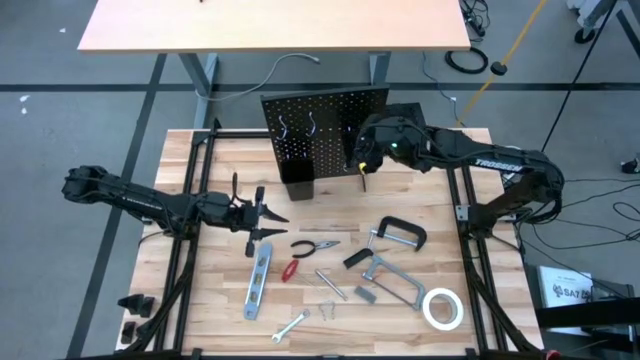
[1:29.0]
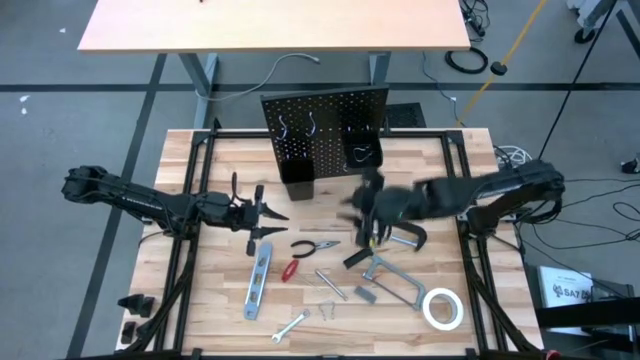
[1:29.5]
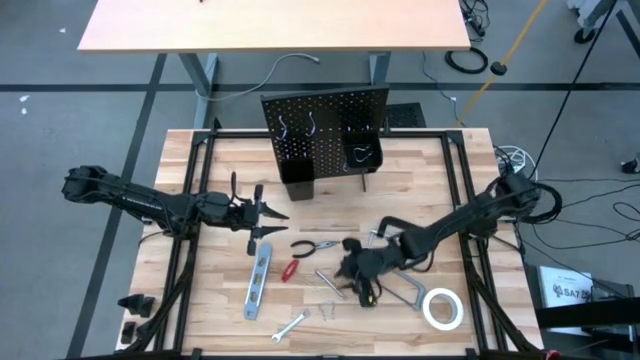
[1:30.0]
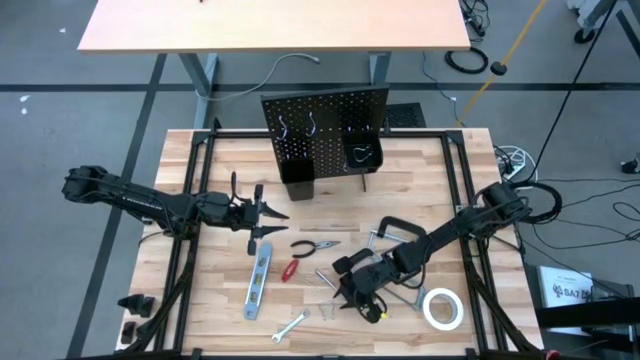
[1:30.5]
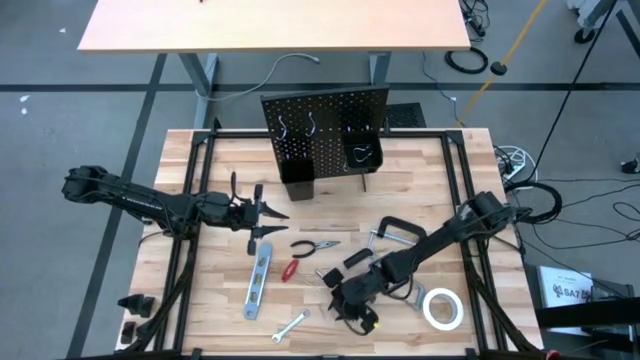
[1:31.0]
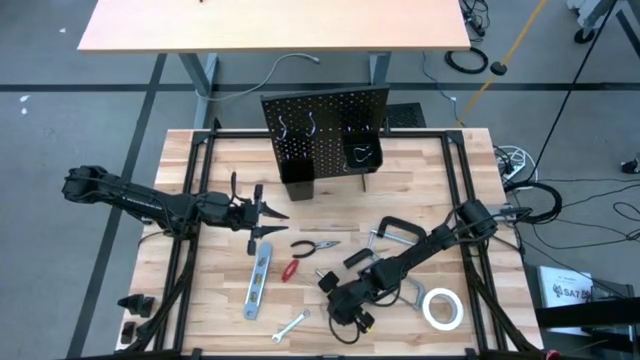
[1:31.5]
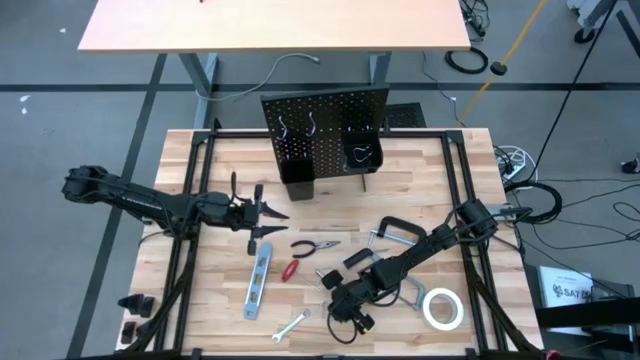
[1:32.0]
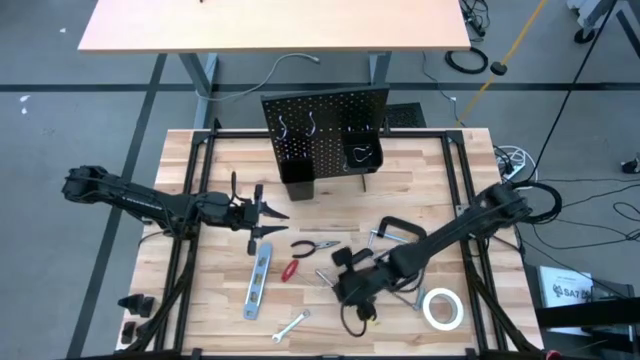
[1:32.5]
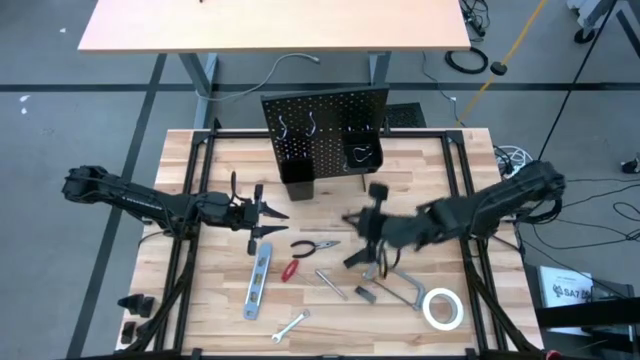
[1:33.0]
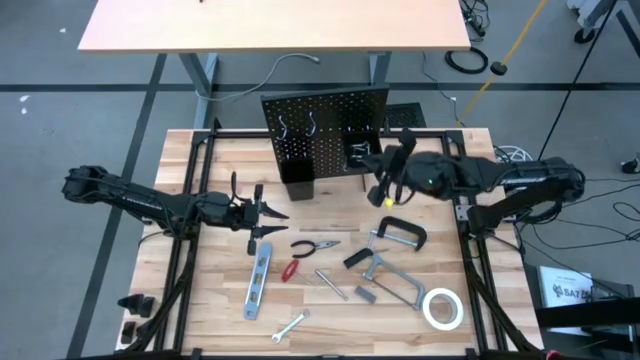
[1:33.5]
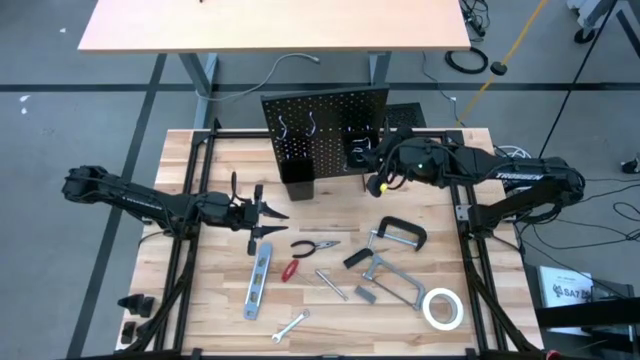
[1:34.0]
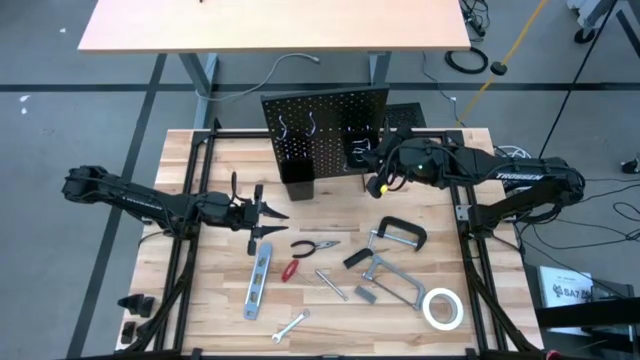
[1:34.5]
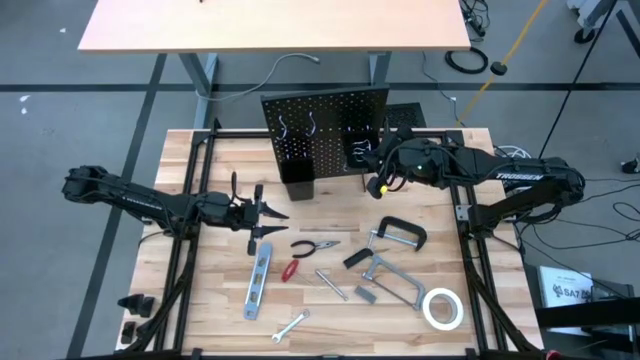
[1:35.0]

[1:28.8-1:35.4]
Task: Hang tools onto peg board
Put the binder clip into the right black bin on the pegboard

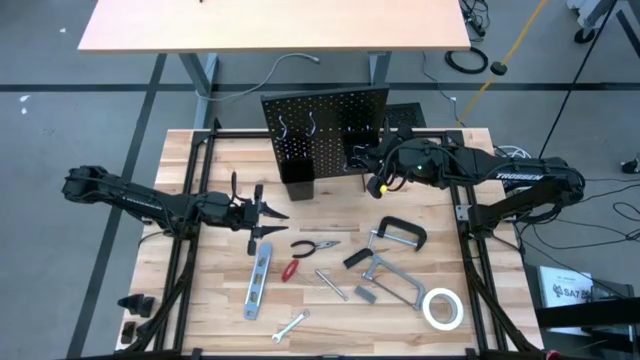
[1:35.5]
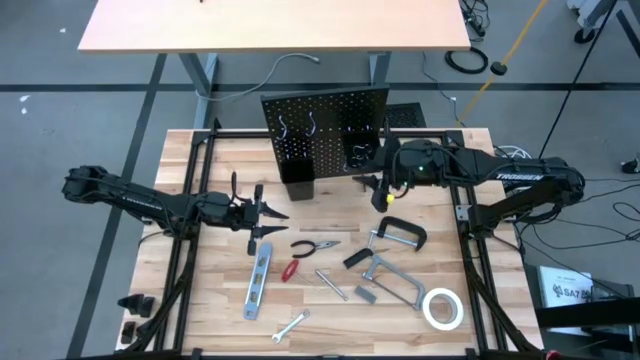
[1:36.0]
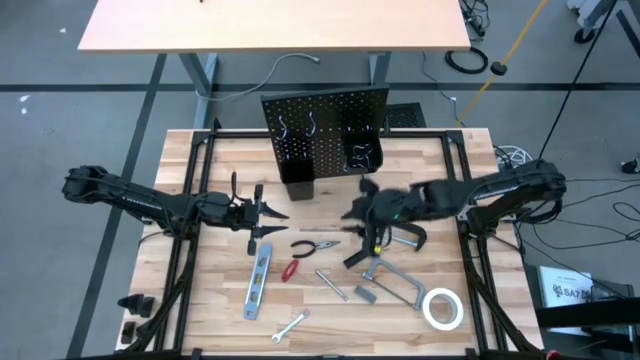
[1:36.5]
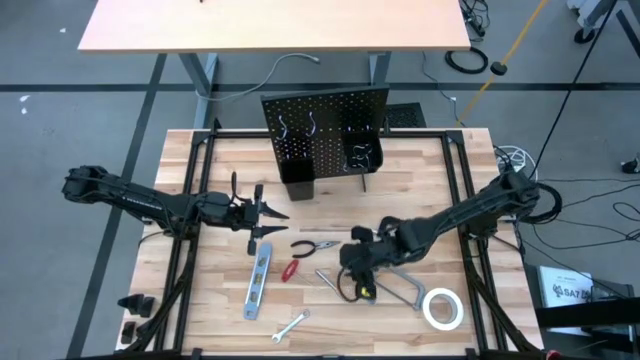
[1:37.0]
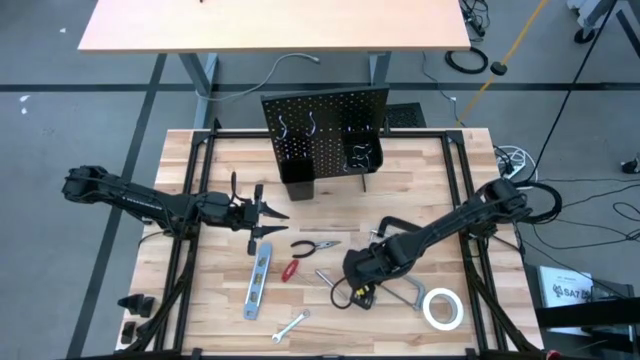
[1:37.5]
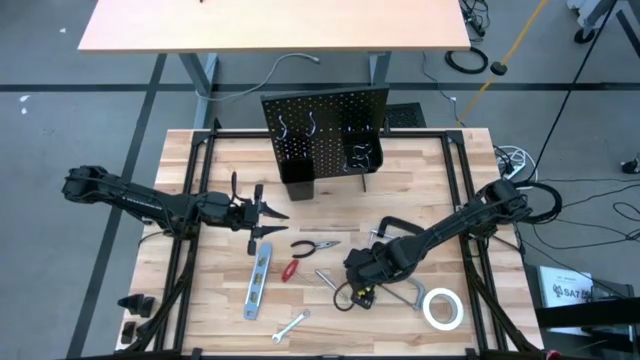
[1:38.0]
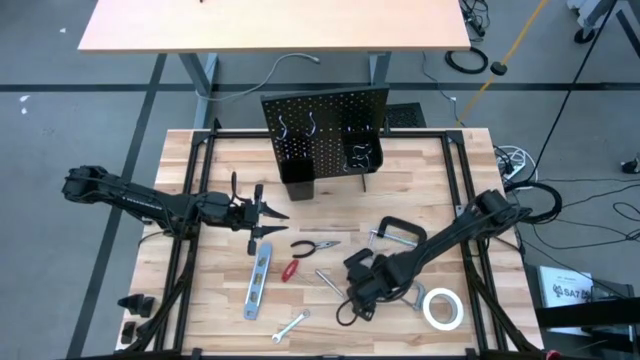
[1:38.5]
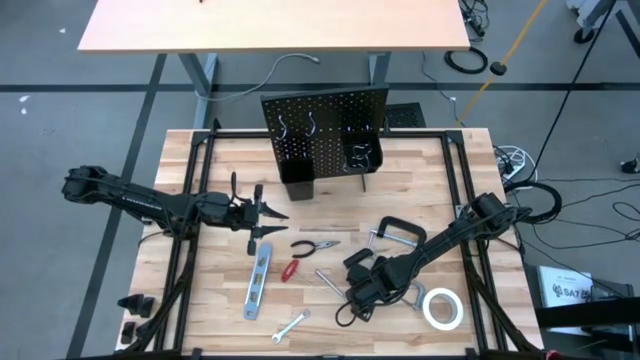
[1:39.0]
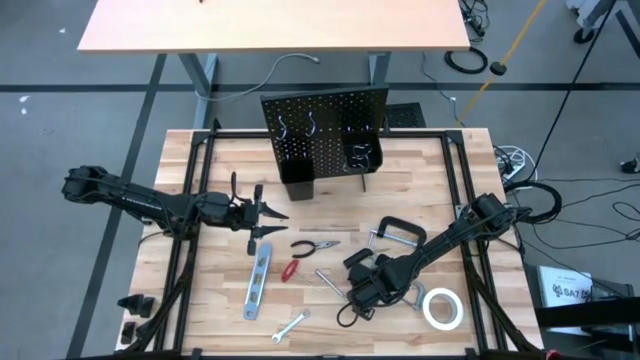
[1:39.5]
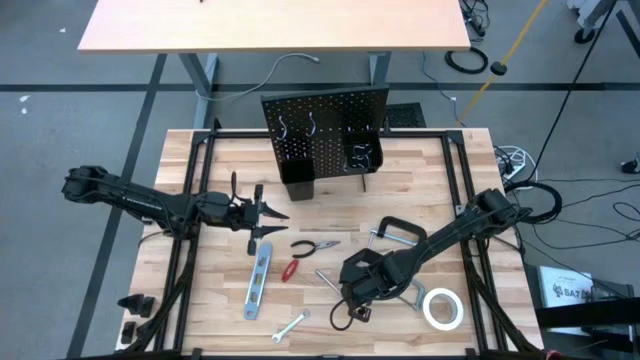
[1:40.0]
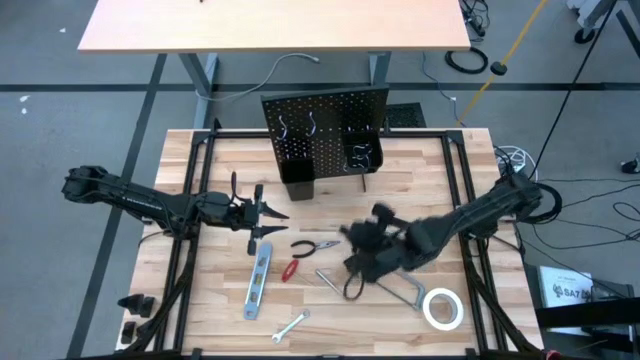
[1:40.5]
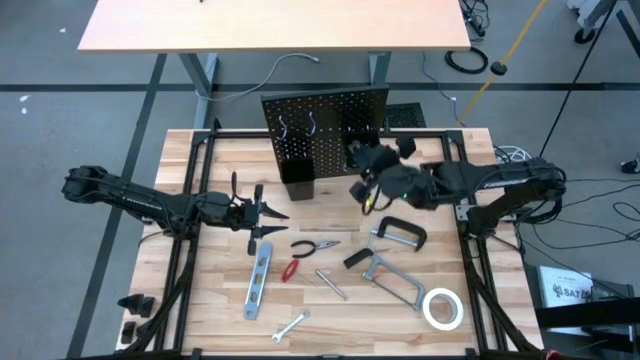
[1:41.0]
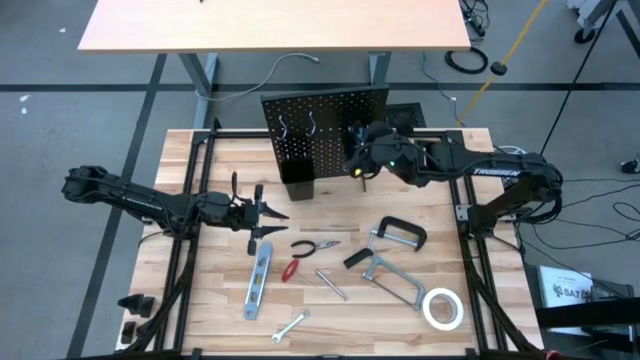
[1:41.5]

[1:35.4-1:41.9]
Put the leveler into the right black bin on the pegboard

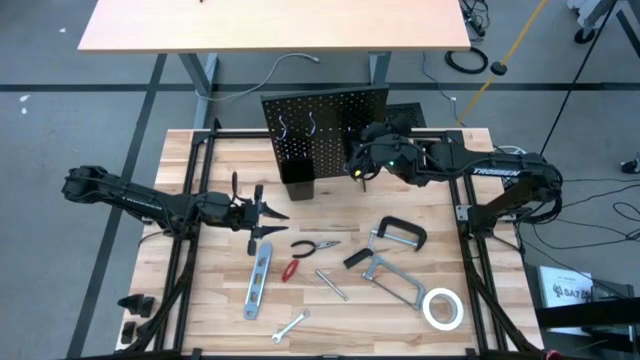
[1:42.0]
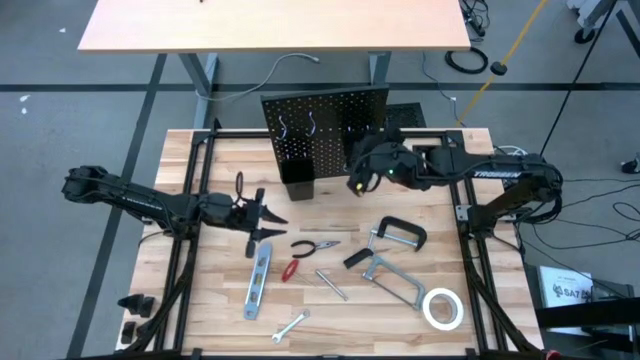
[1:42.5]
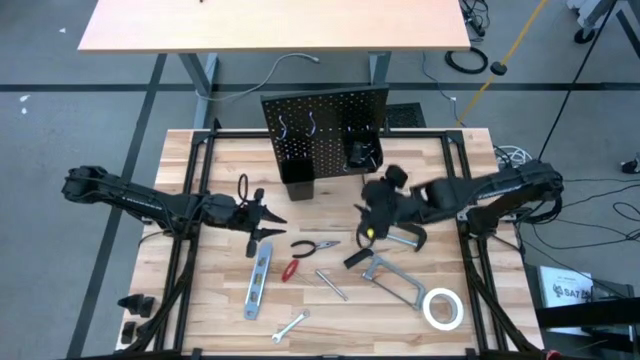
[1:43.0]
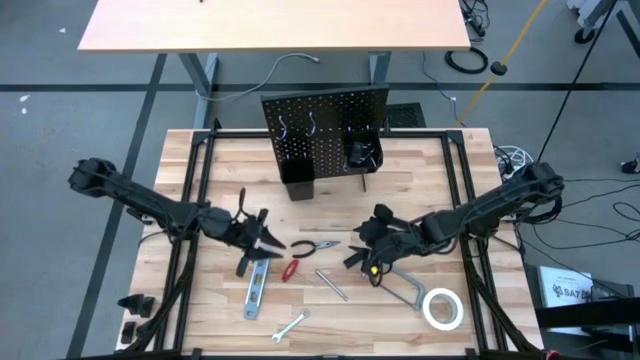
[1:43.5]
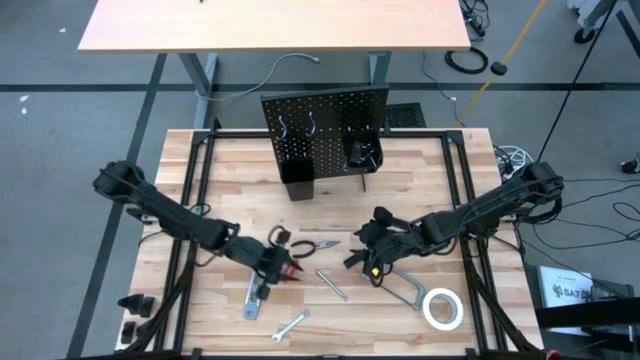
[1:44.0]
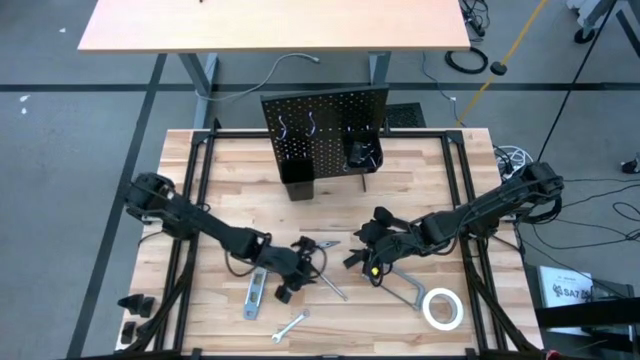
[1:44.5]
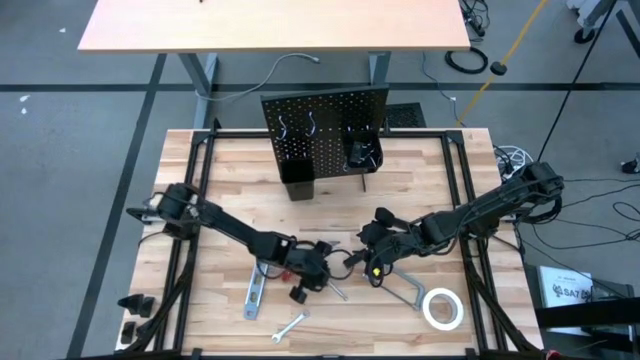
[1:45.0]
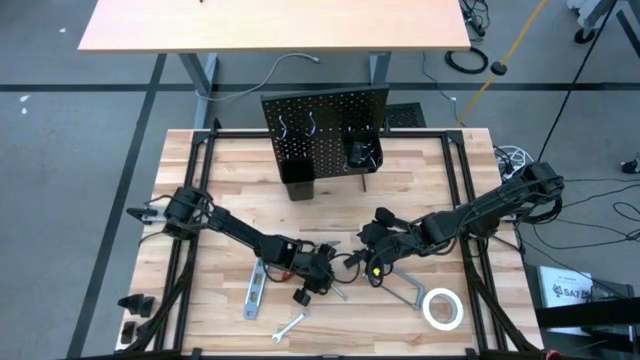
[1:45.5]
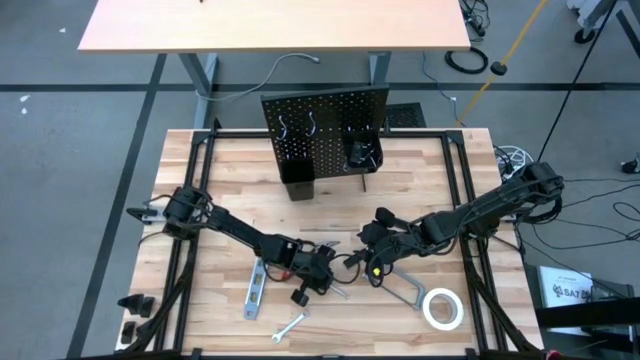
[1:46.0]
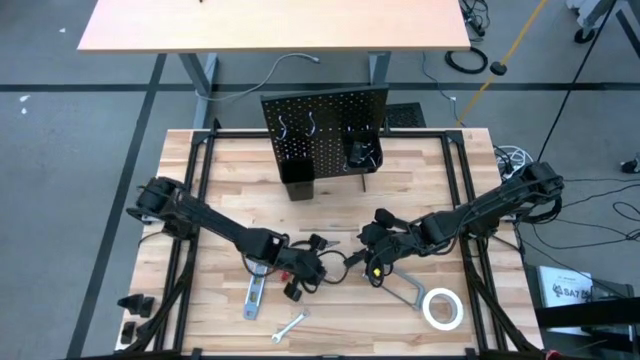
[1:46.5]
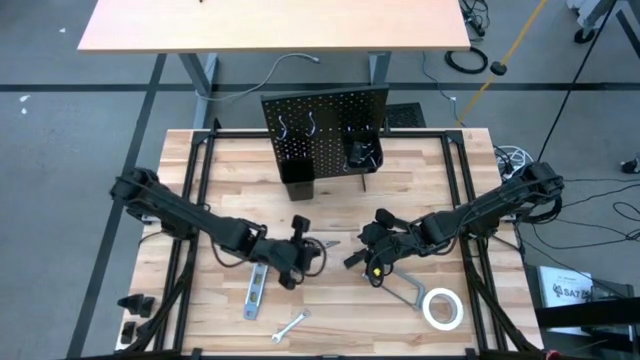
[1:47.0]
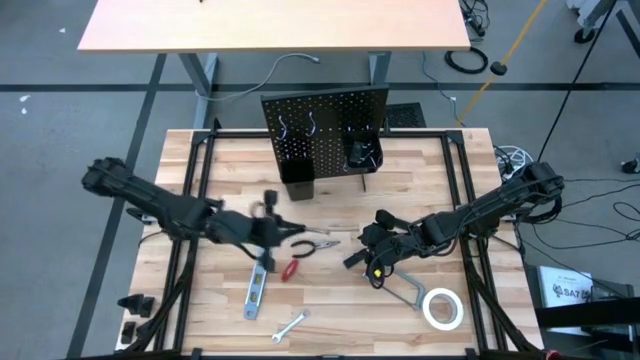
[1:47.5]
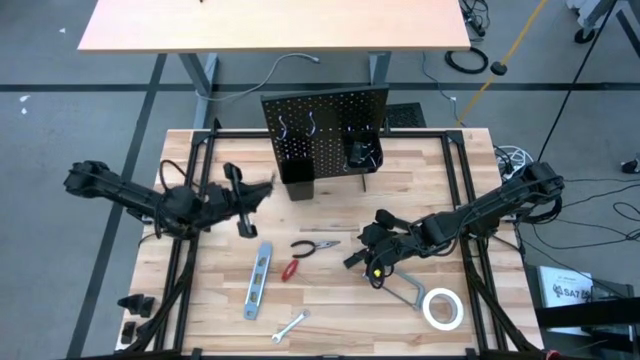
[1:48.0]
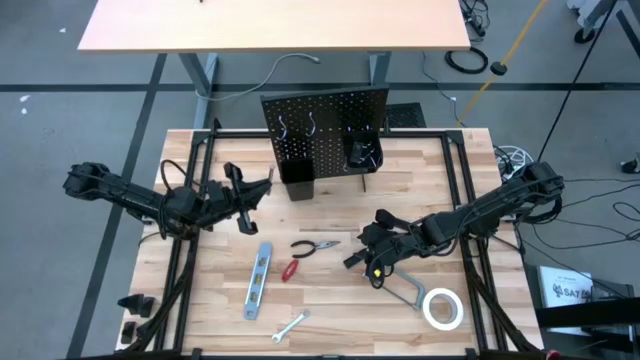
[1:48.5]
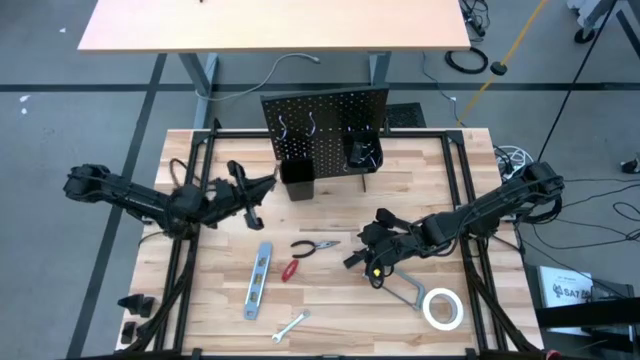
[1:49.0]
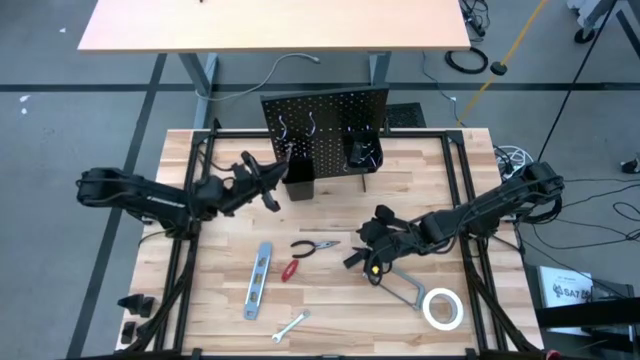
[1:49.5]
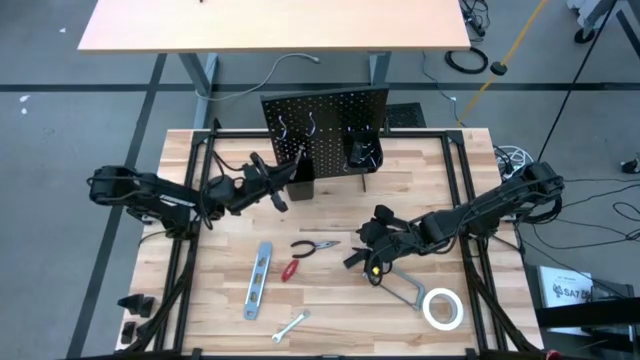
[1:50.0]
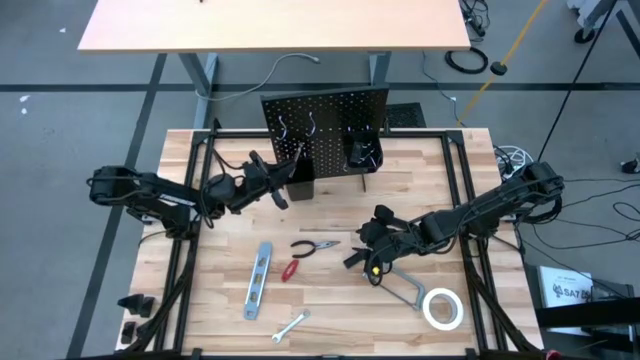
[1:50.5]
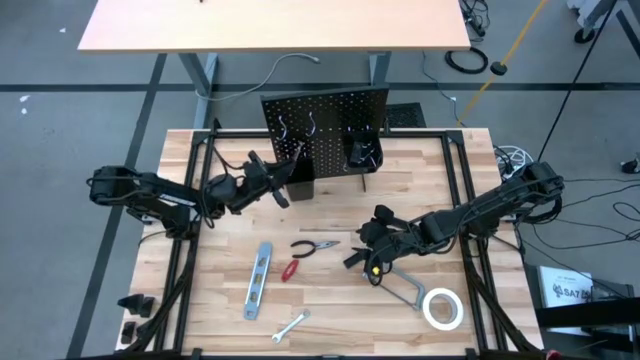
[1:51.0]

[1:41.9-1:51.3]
Put the silver telescopic magnetic pen into the left black bin on the pegboard
